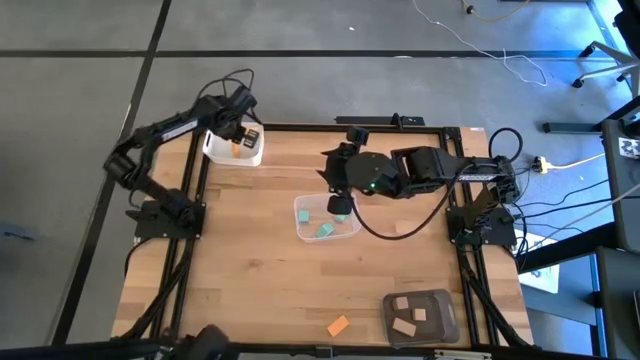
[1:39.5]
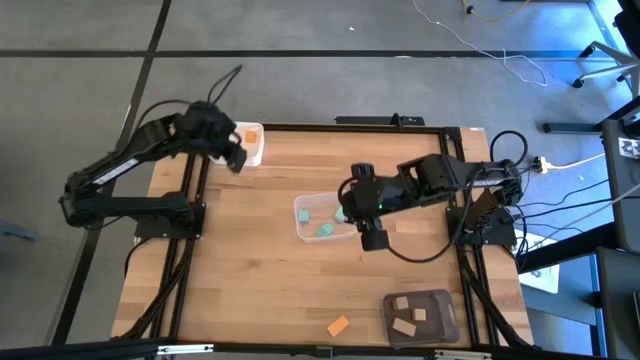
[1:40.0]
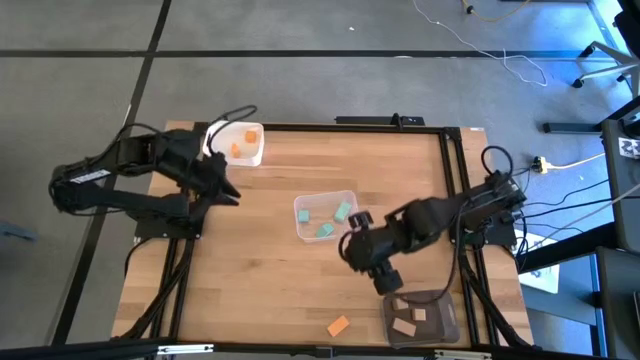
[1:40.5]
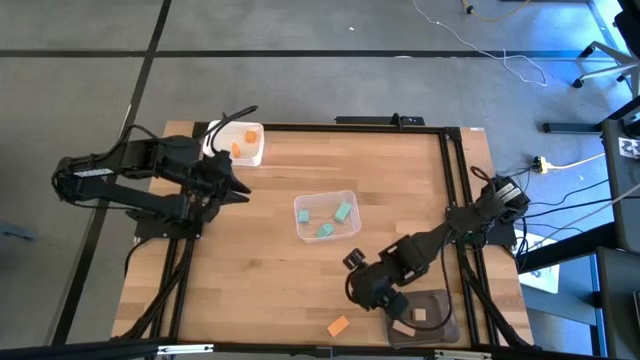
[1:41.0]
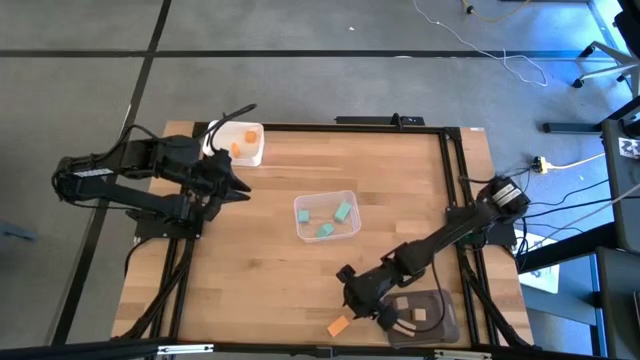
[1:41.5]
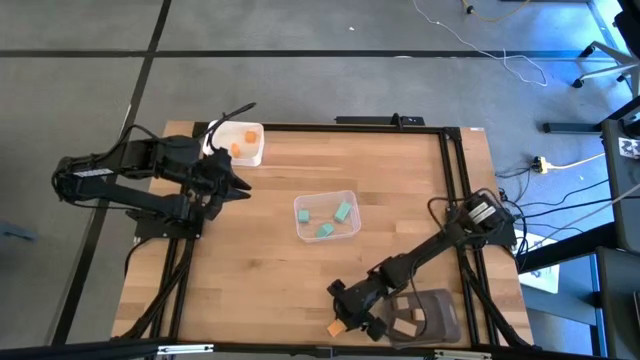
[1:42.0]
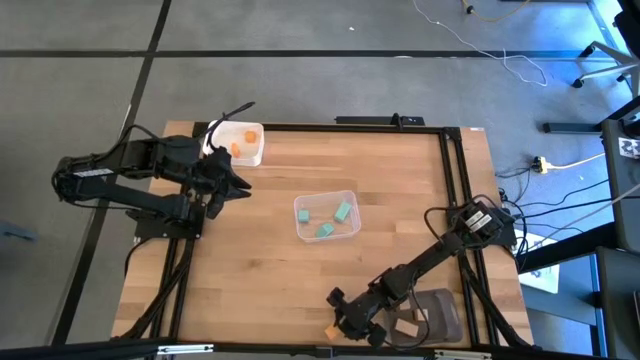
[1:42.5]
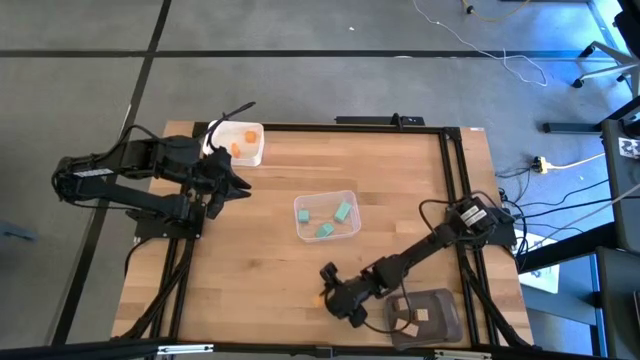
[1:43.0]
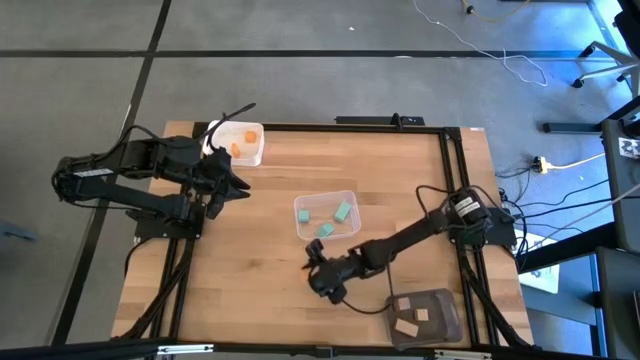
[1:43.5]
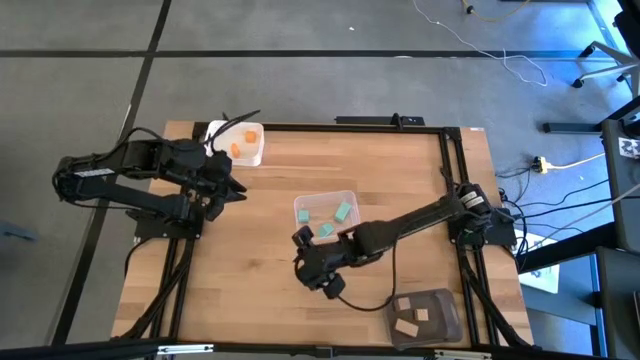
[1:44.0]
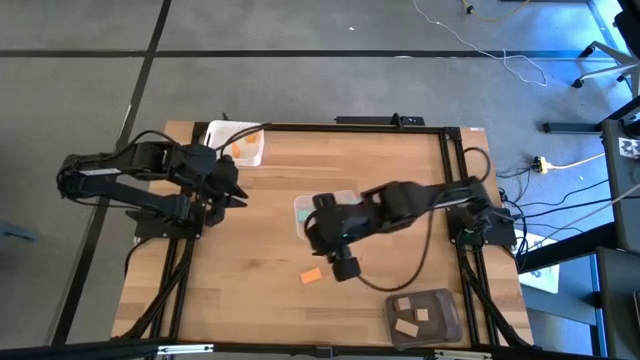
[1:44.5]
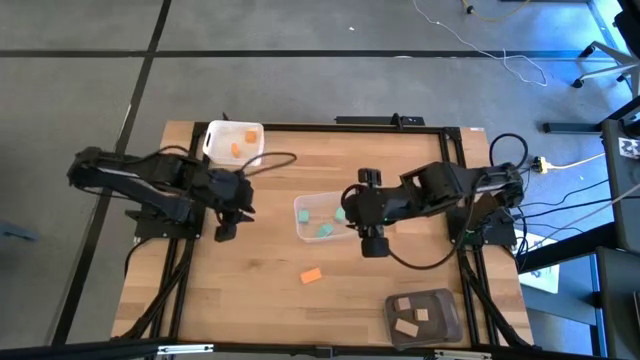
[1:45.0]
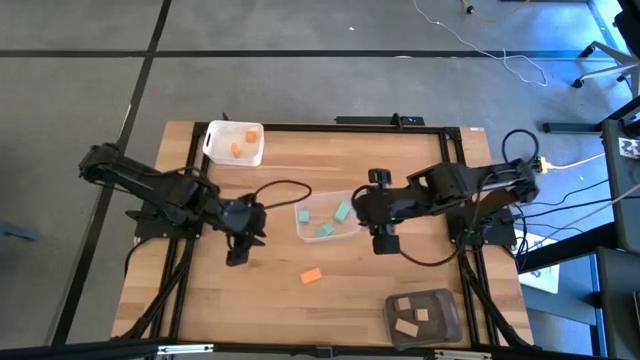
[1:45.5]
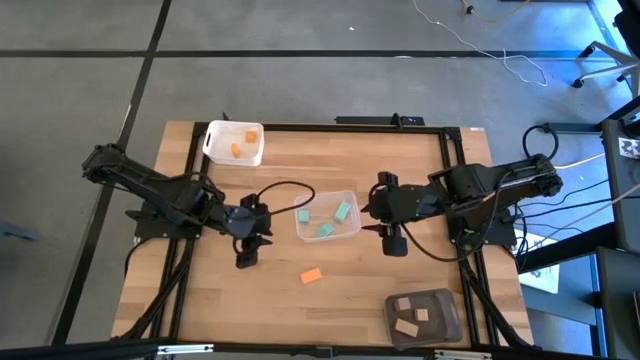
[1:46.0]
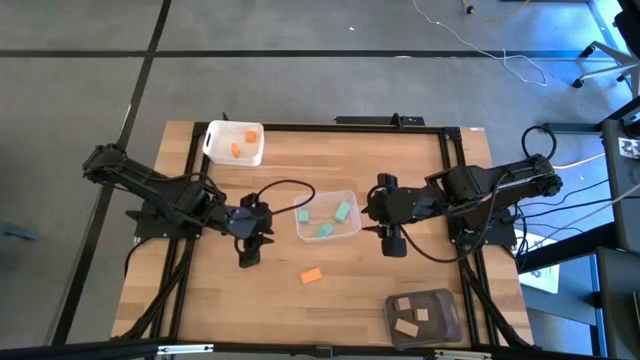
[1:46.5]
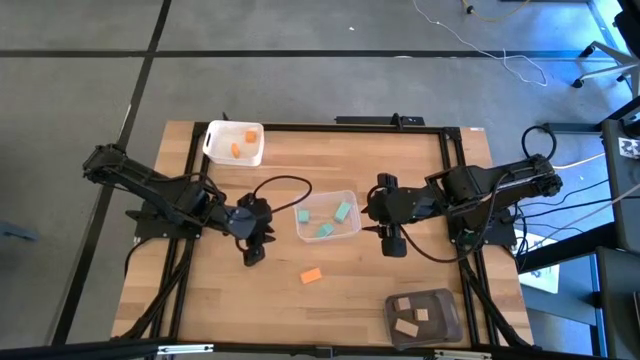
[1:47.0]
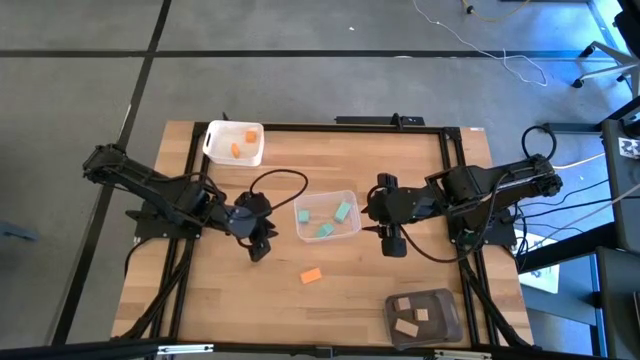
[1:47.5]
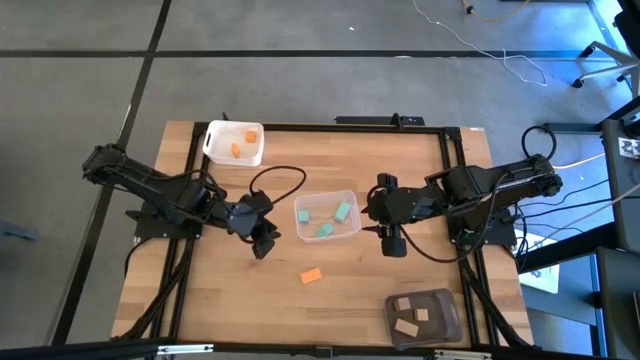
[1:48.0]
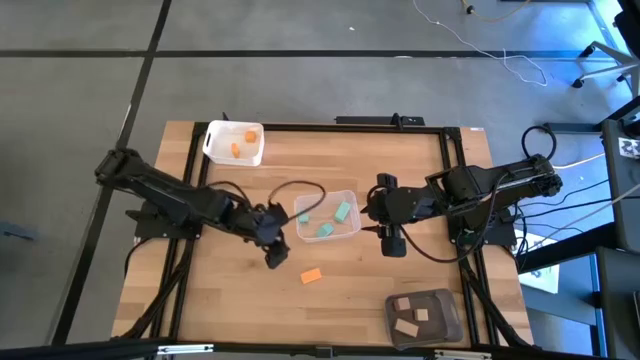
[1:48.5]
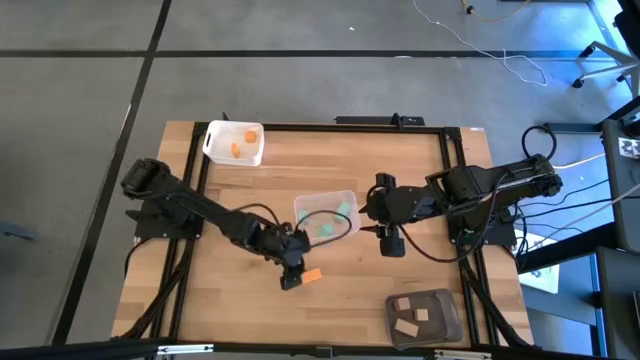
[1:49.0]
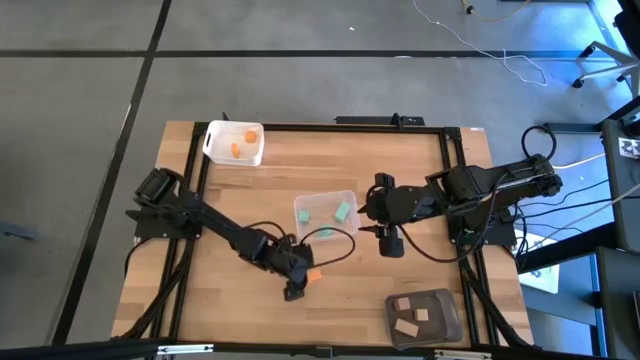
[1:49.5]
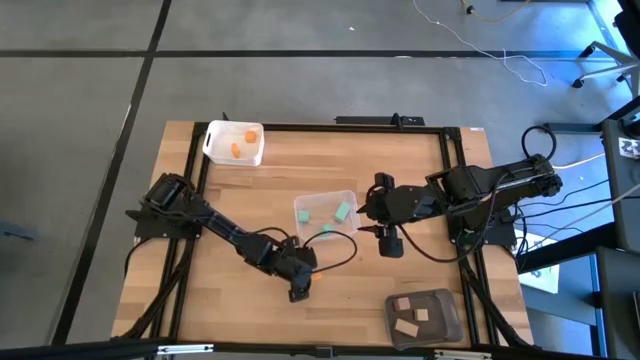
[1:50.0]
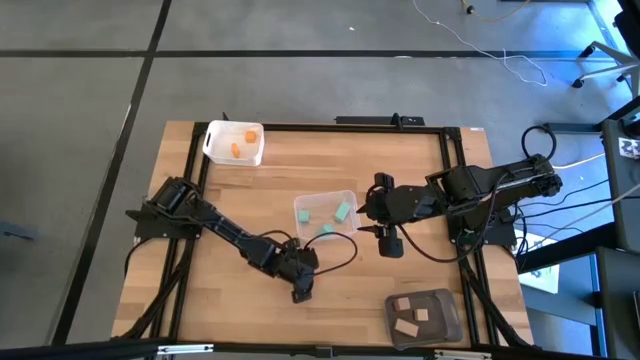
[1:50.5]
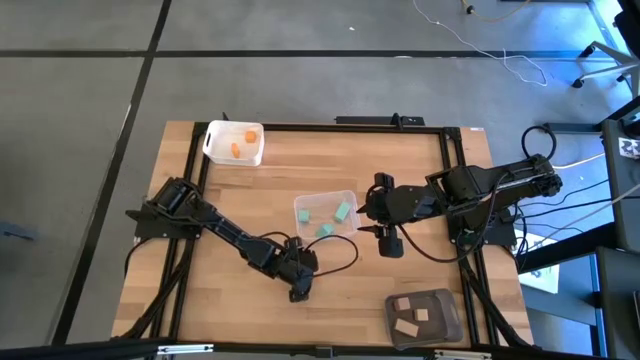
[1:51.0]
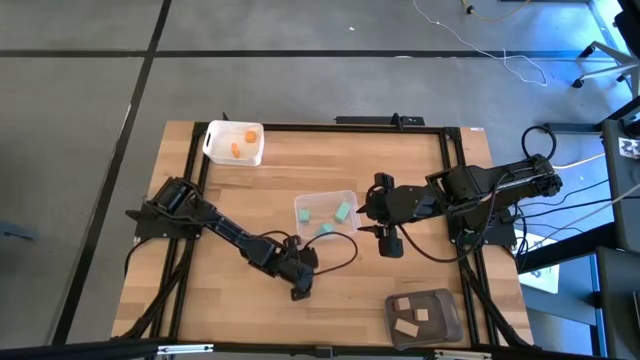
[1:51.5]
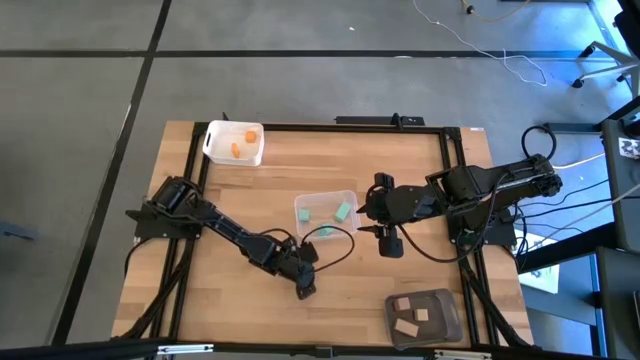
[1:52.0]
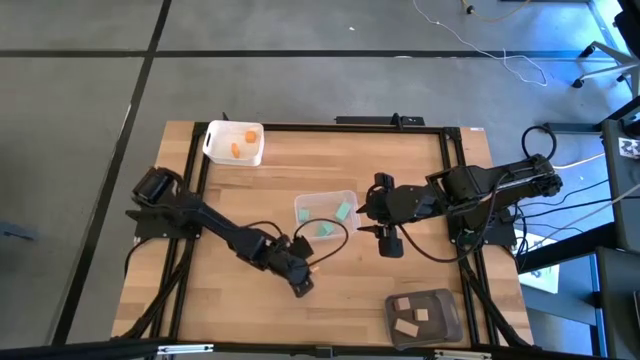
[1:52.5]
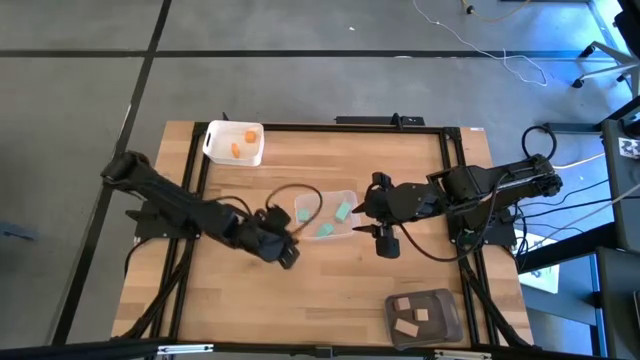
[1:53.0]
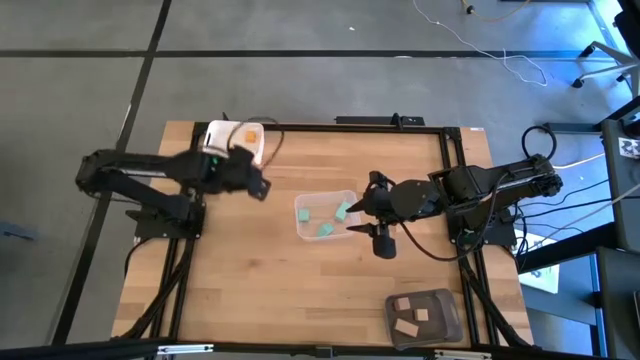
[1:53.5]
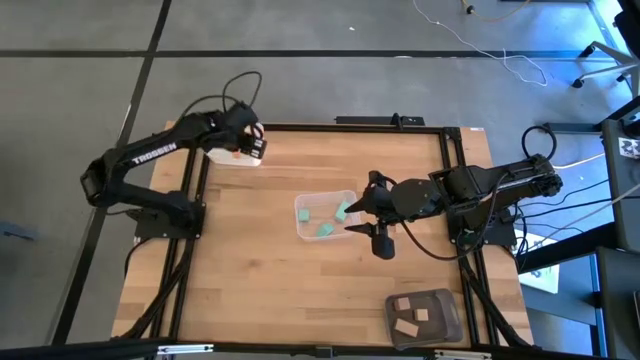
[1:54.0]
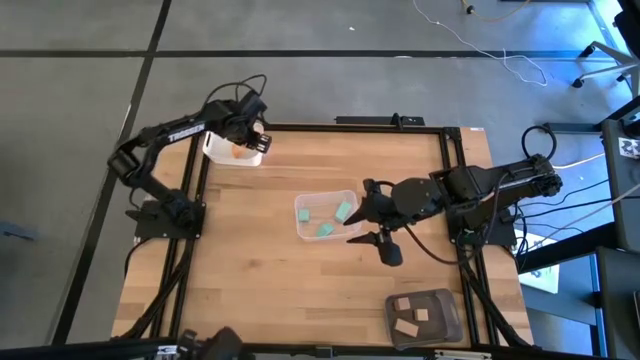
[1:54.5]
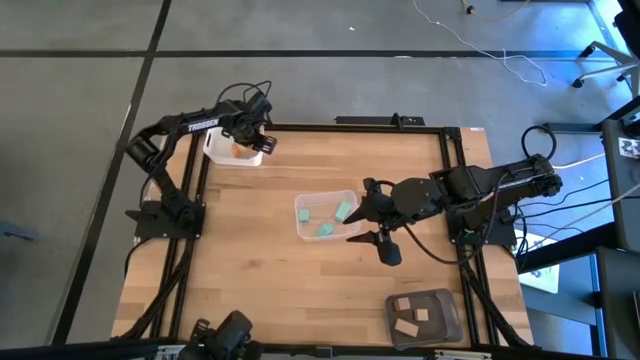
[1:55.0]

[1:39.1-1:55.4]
Task: Sort & place blocks by color
Put the yellow block into the white bin

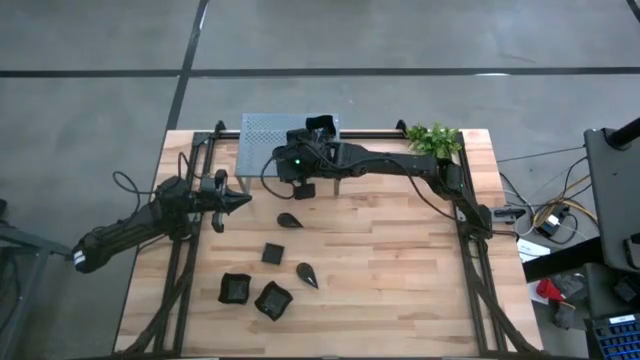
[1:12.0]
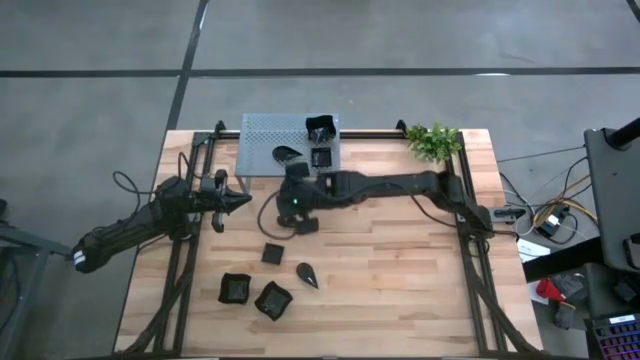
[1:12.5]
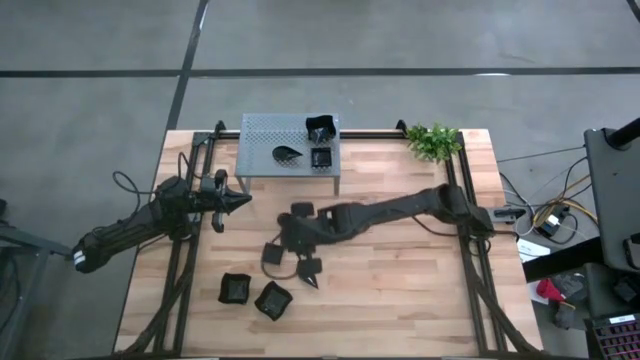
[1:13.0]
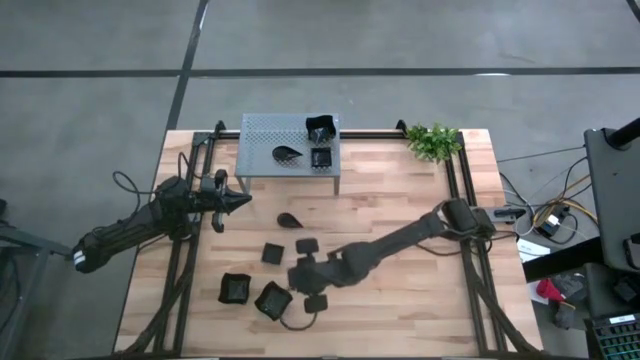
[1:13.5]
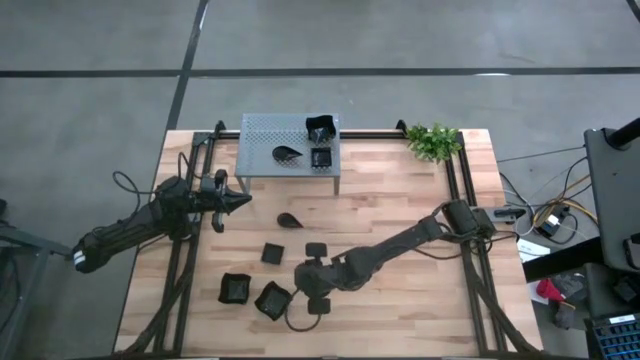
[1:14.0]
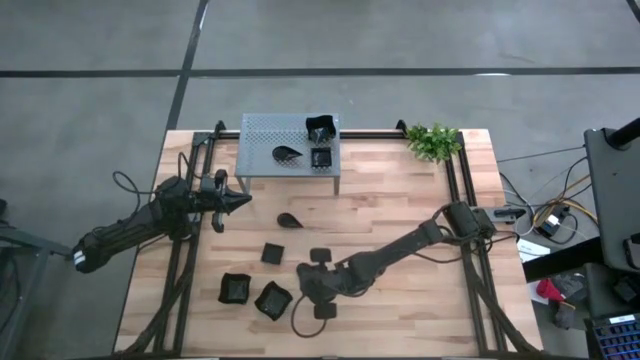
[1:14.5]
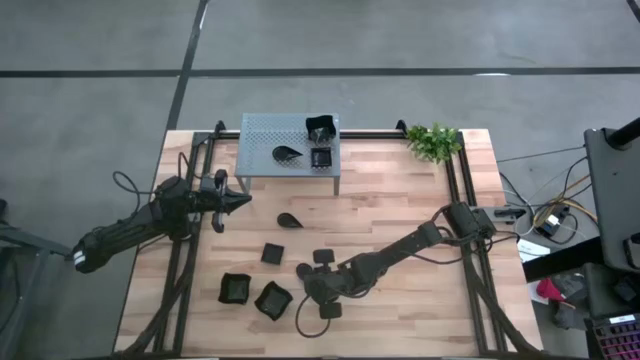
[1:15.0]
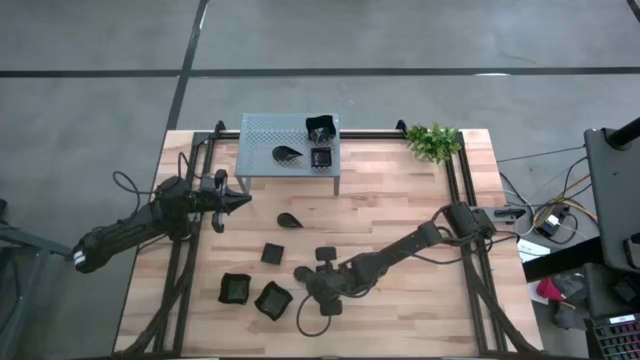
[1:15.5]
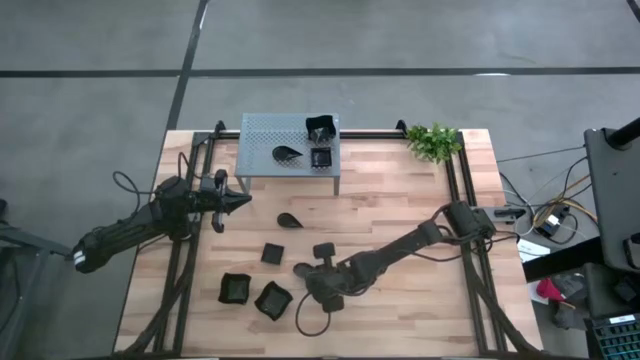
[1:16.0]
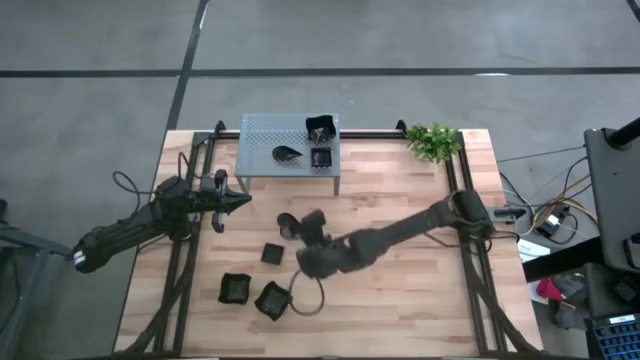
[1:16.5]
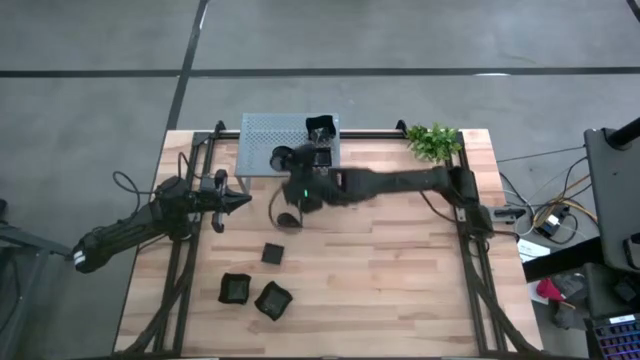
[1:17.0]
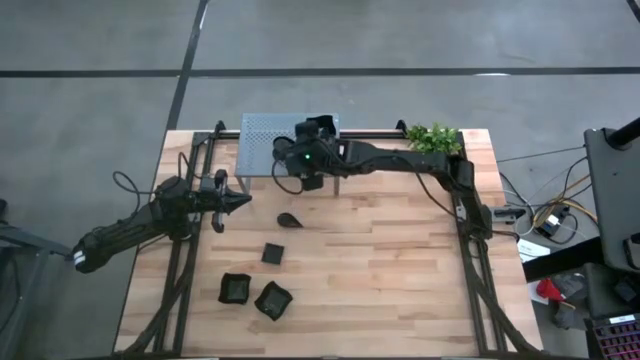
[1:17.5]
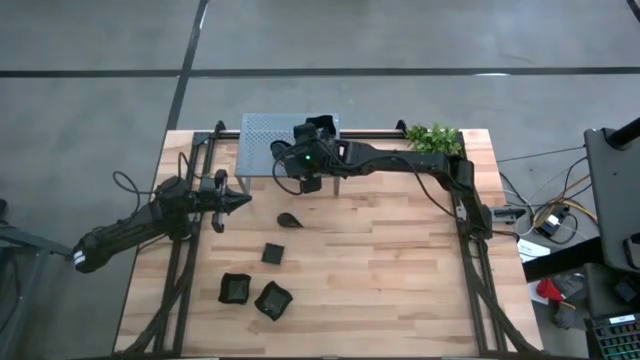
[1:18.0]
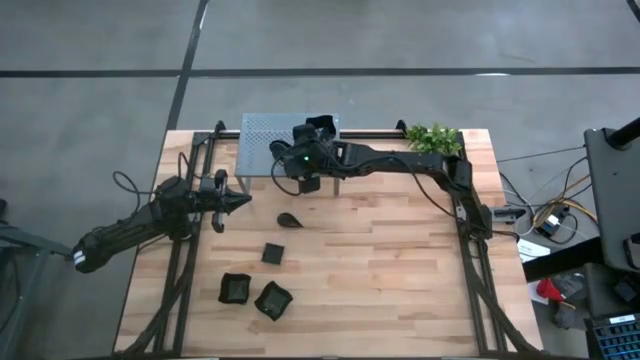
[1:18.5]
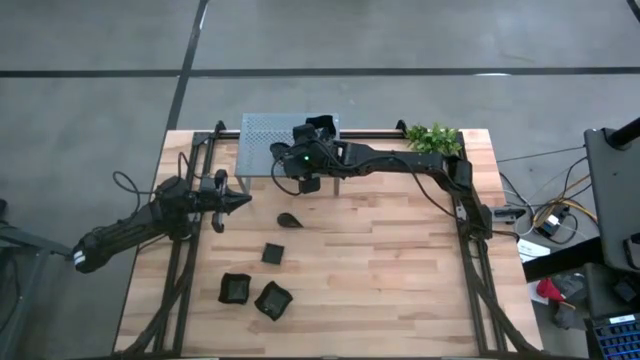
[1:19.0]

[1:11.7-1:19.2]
Task: Pick & Place Mini shaped plates
Stack the black drop shaped plate on top of the black drop shaped plate on the shelf
